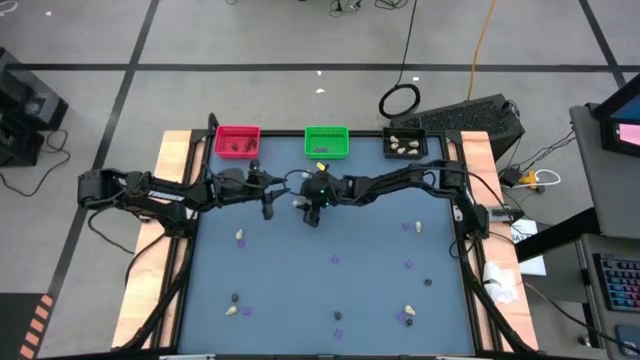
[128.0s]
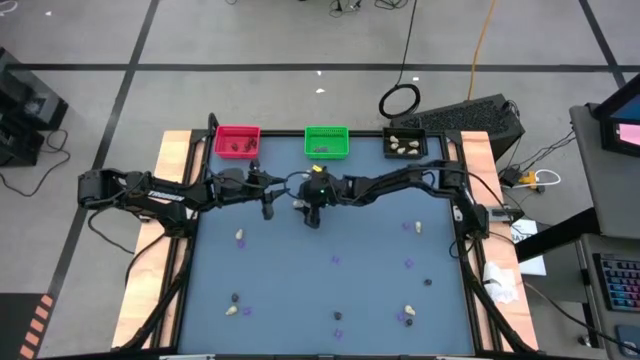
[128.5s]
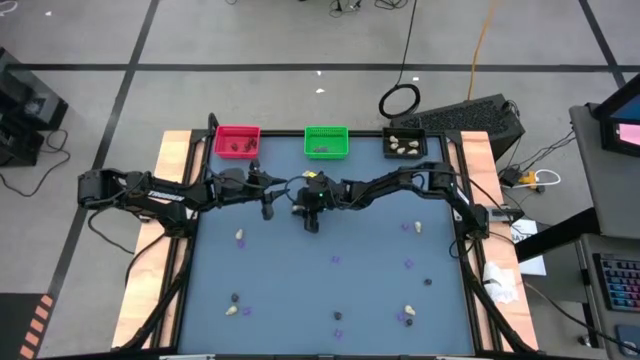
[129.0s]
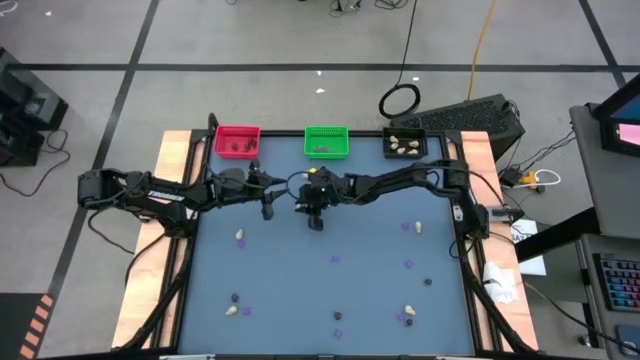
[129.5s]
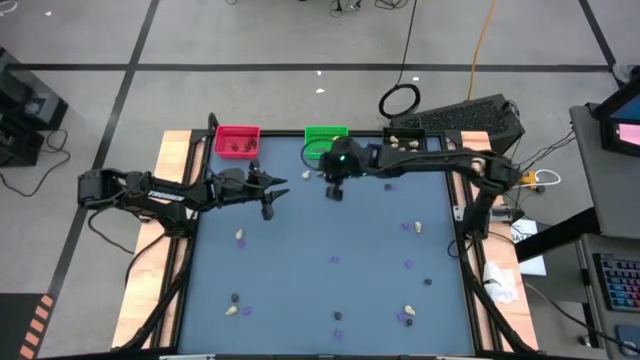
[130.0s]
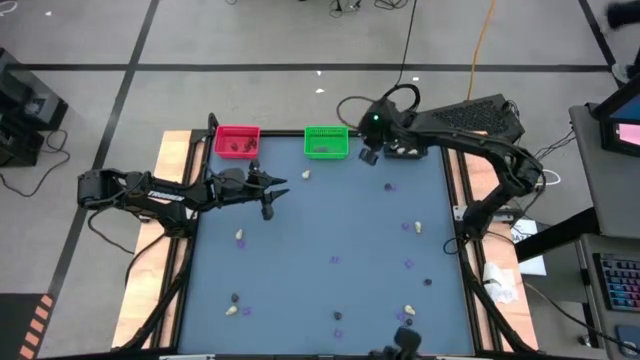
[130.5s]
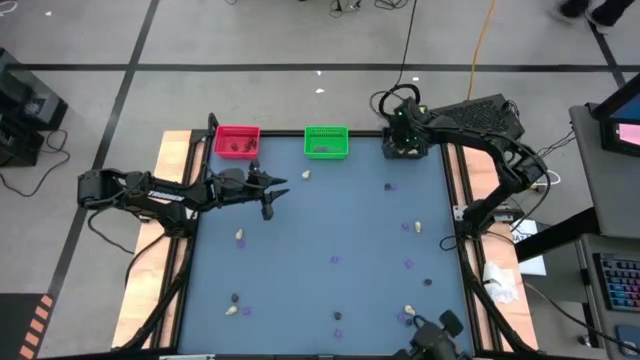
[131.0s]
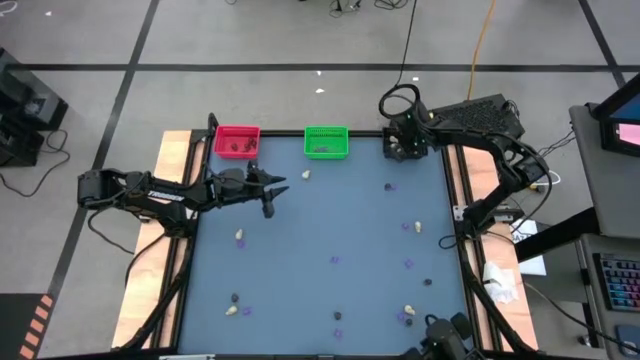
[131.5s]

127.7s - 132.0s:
Task: Sort Halloween decoration
Put the white skull toy into the black bin

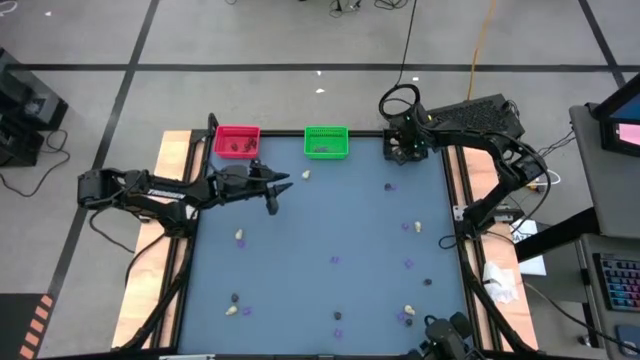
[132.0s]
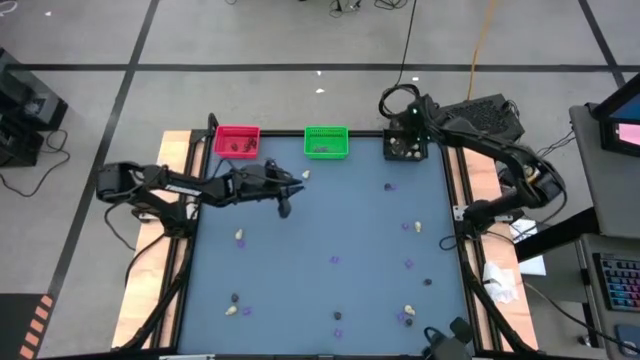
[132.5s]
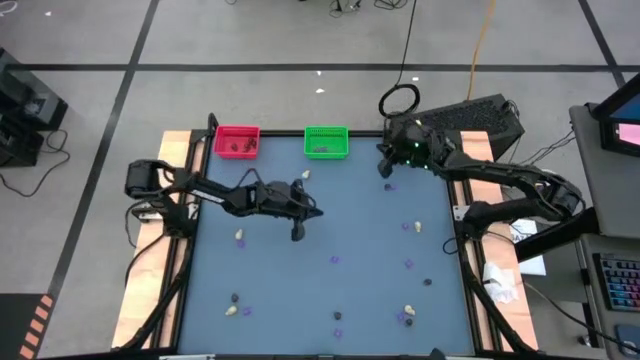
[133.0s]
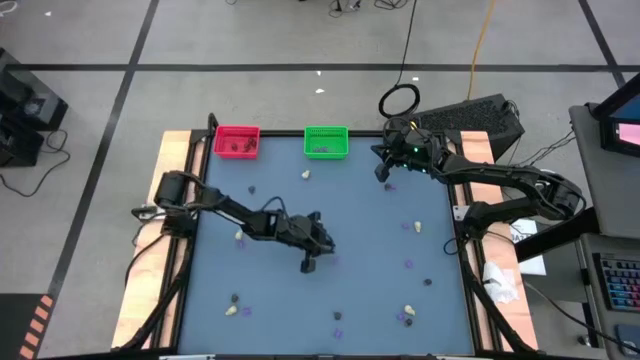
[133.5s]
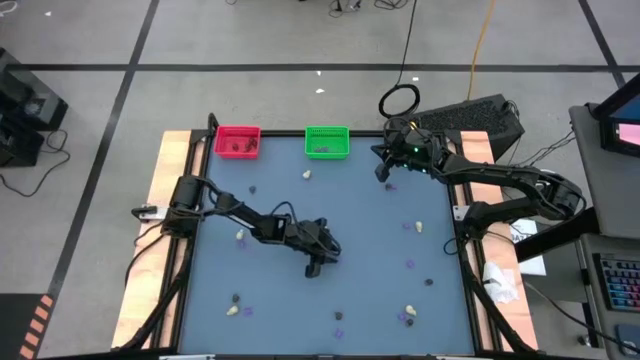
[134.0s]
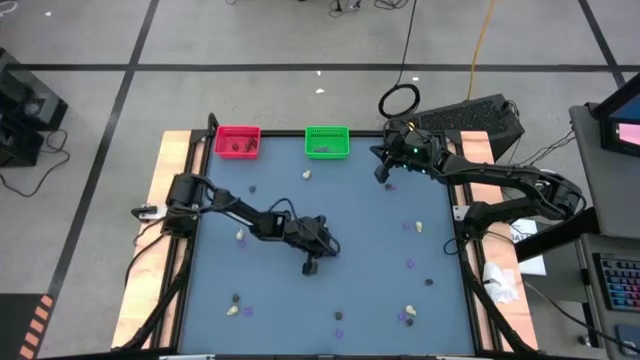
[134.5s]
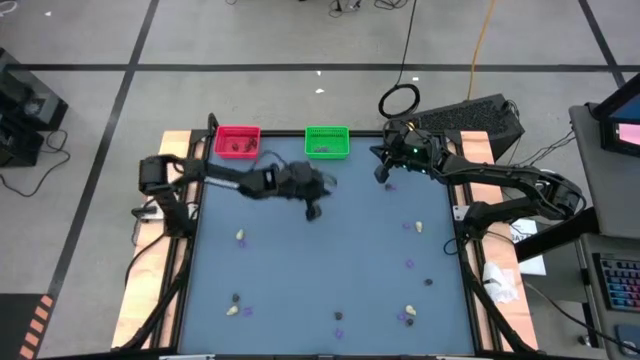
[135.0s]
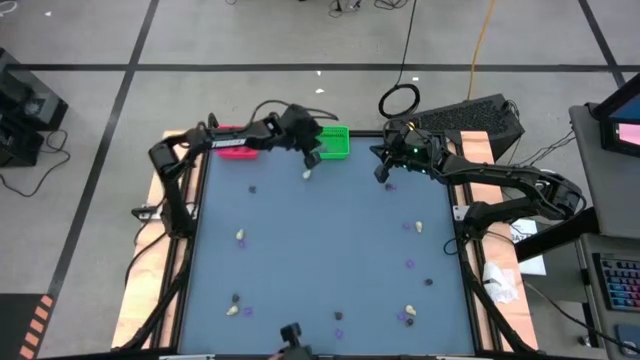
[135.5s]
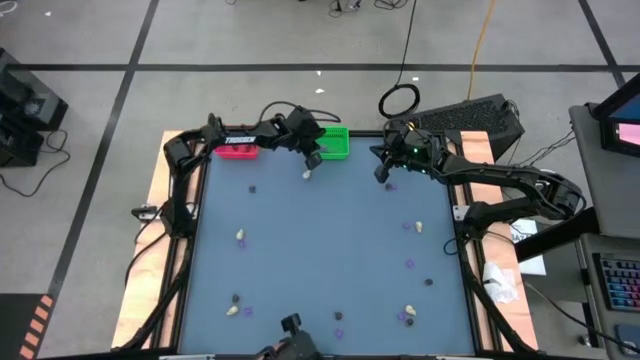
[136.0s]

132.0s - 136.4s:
Put the purple spider toy into the green bin

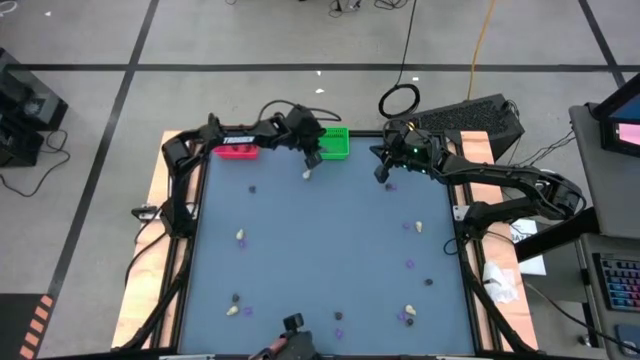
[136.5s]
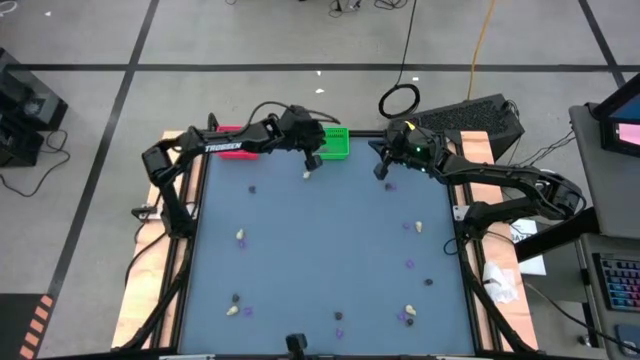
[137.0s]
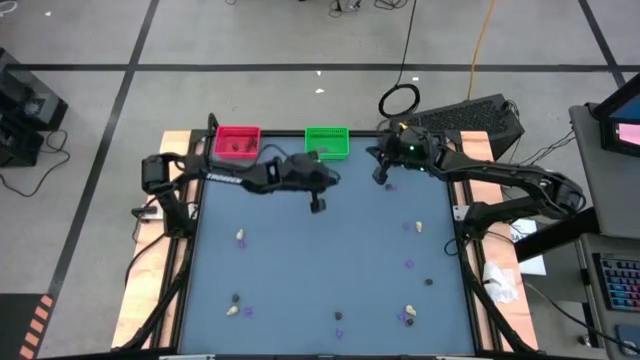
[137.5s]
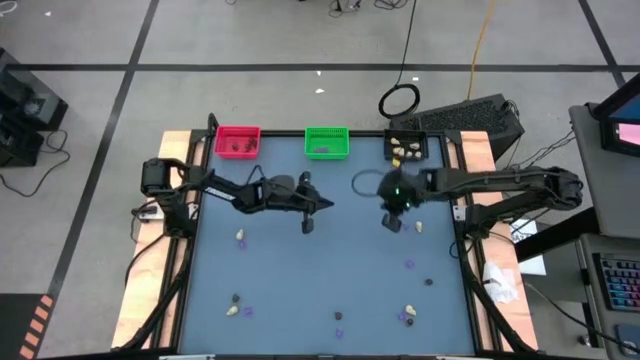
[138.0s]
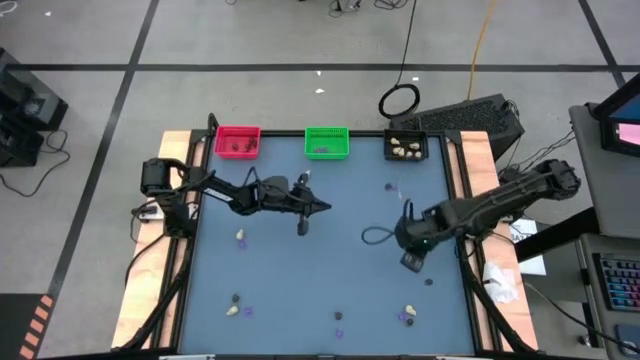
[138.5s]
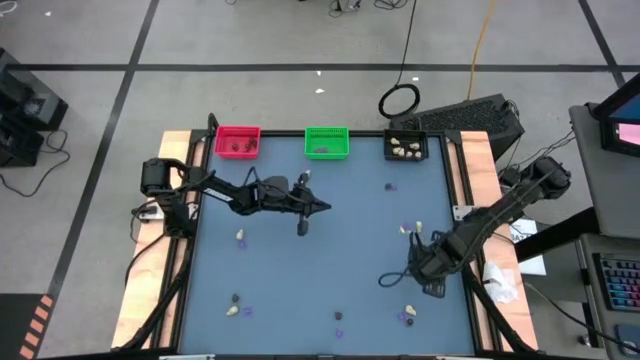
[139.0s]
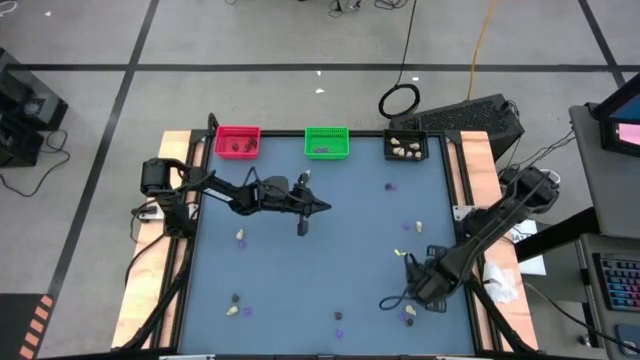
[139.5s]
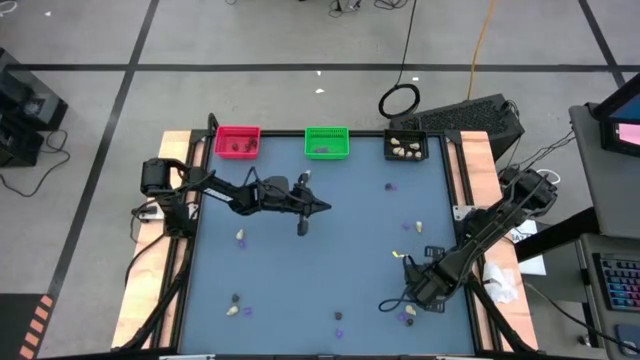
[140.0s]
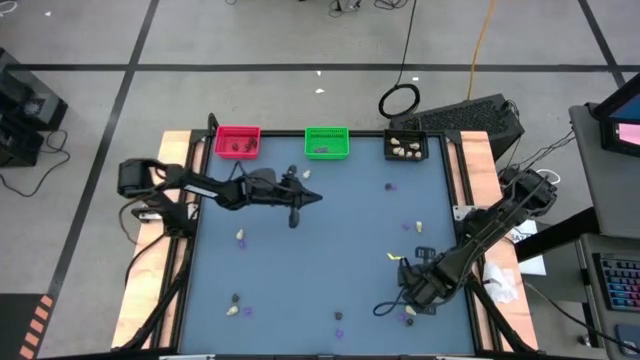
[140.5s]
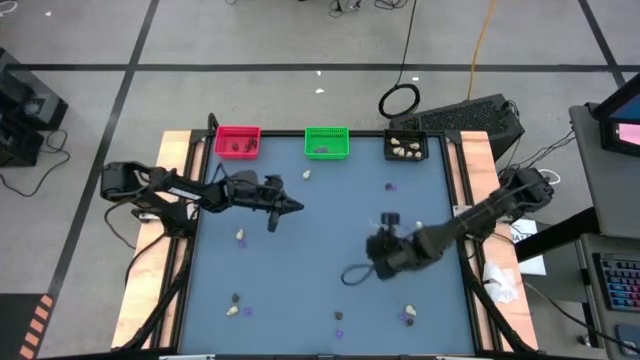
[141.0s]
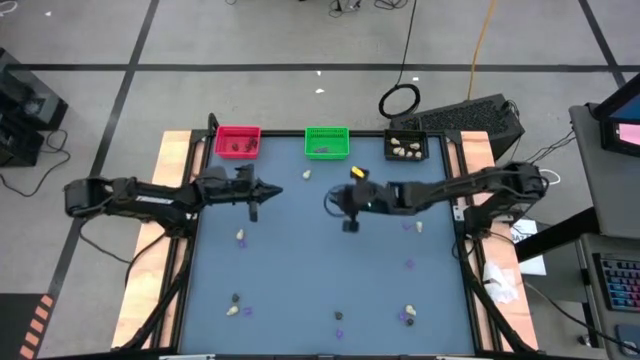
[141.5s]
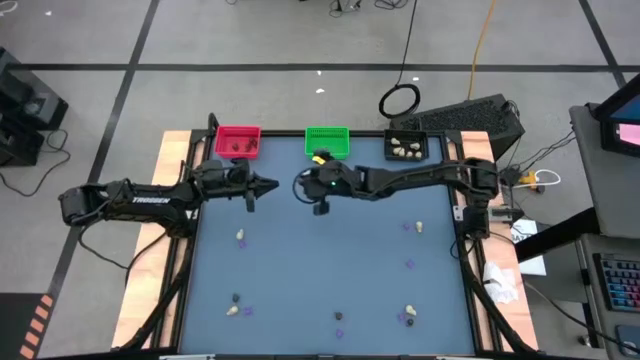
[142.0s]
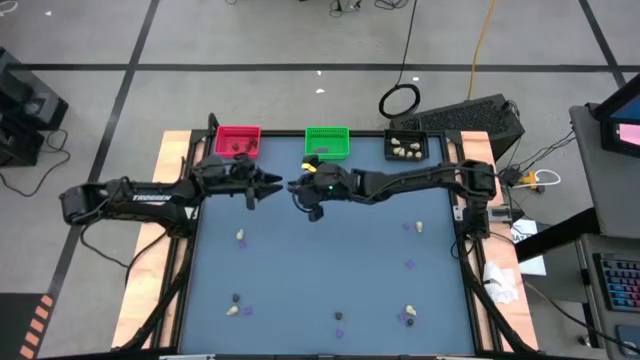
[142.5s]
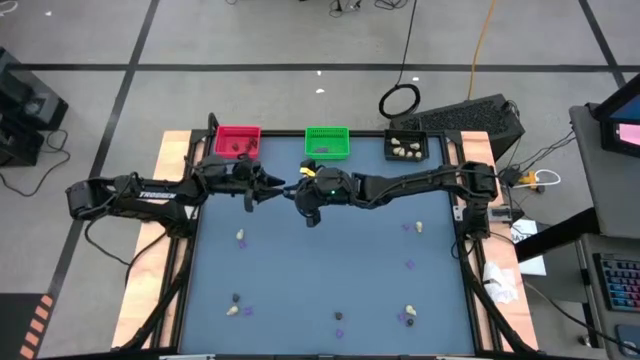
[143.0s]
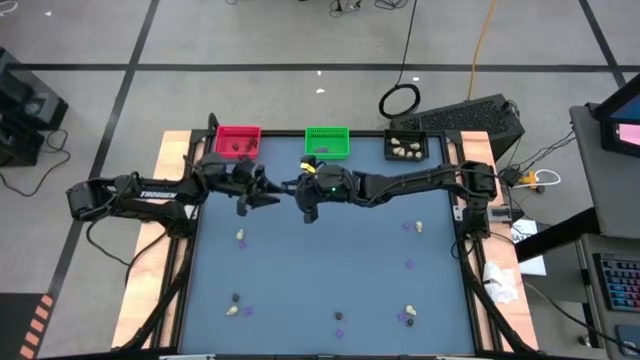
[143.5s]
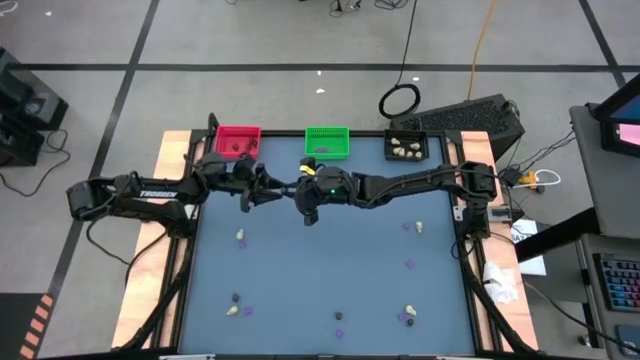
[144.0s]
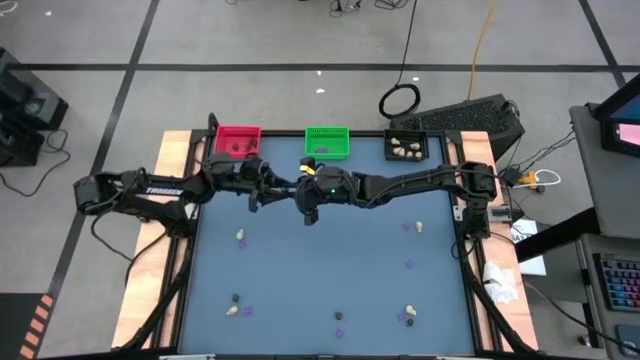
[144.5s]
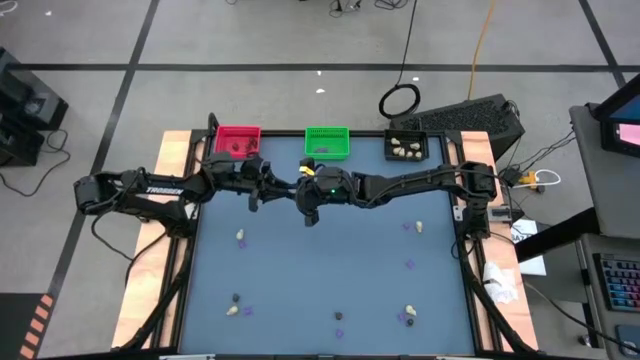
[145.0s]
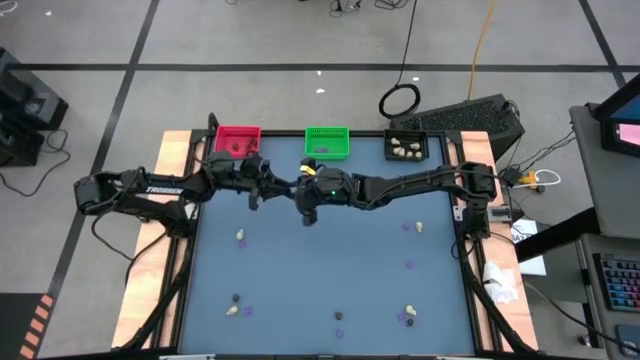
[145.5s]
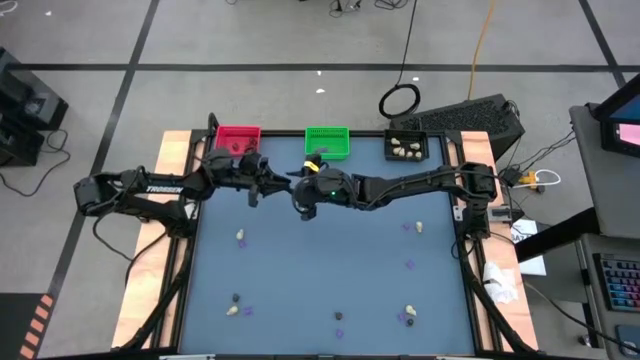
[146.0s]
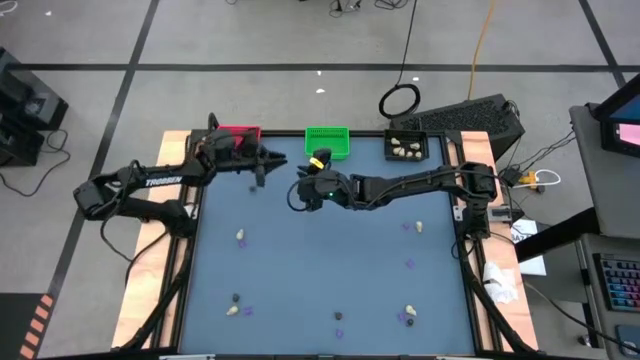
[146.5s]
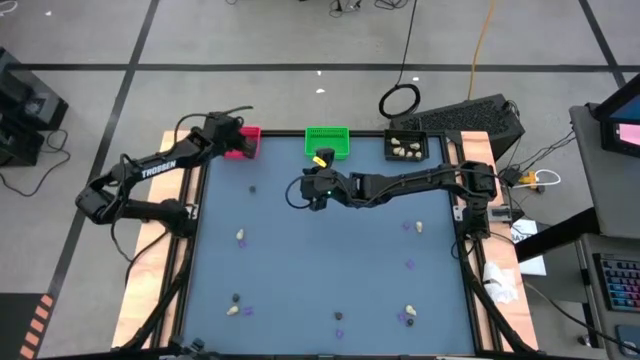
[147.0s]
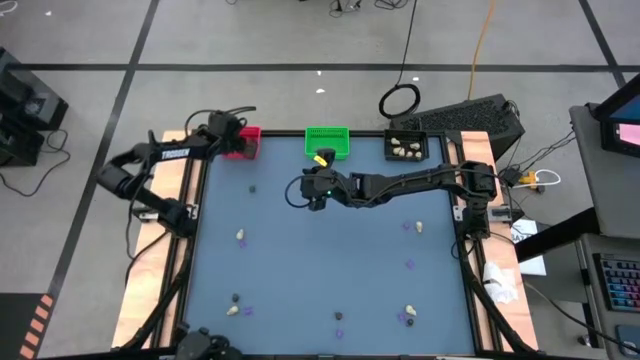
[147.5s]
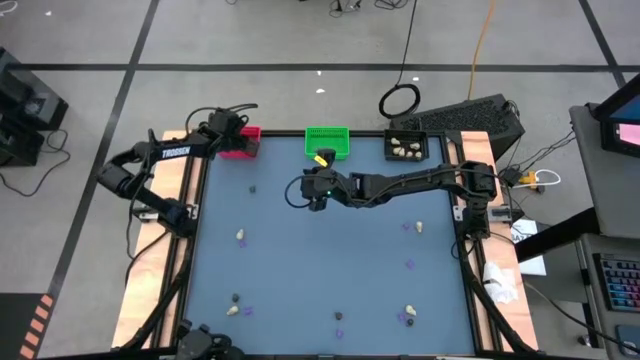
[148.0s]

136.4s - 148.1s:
Put the black skull toy into the red bin

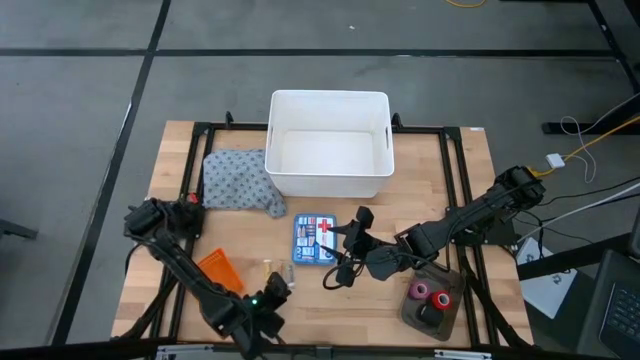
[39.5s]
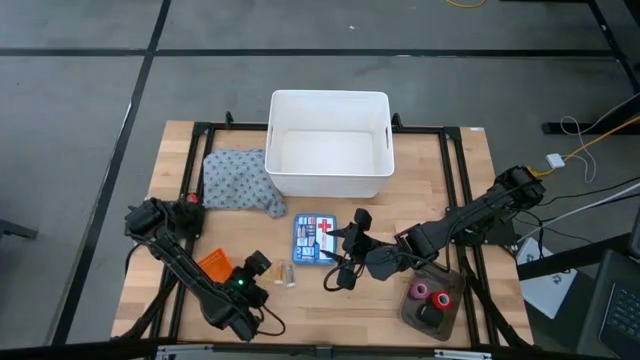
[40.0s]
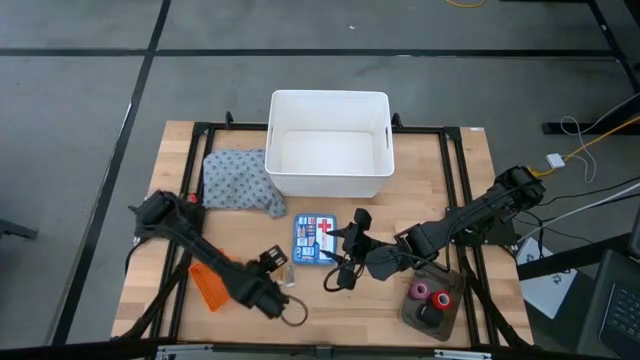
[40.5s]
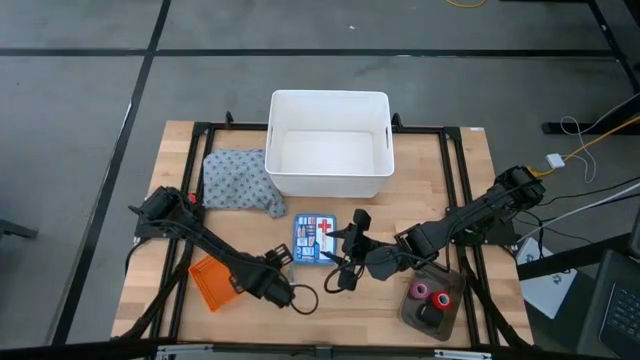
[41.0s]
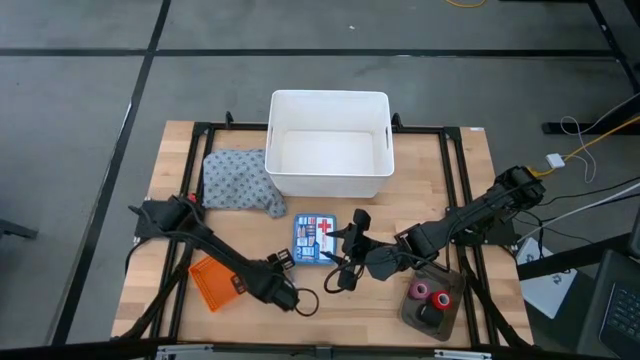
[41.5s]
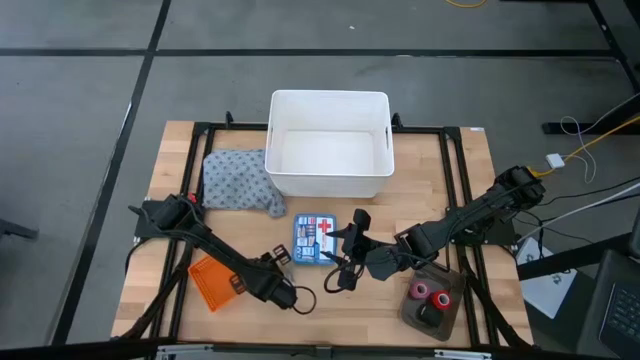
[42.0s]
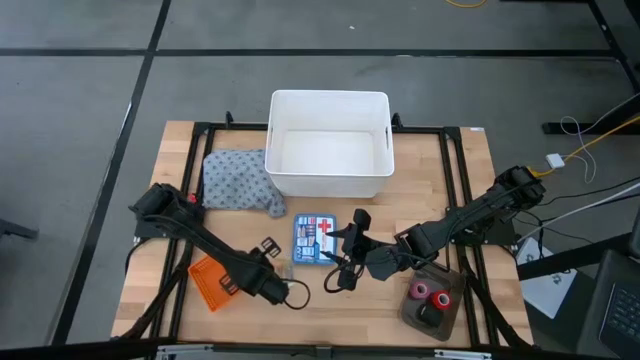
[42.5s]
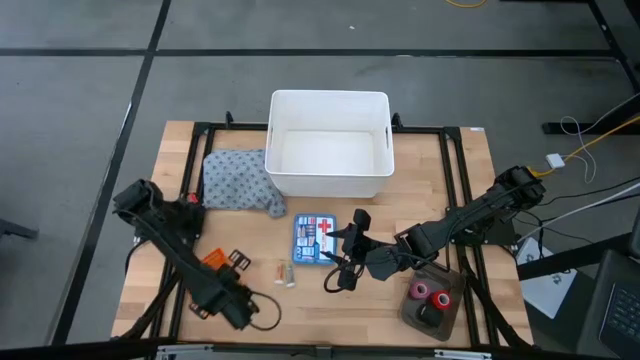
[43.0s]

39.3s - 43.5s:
Task: Pick & place medical supplies in basket/bin
Put the left yellow pill bottle into the orange bin
